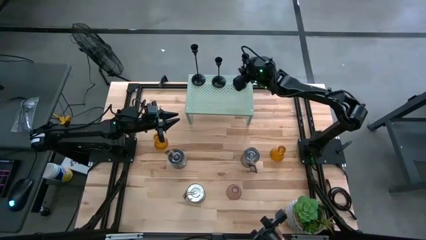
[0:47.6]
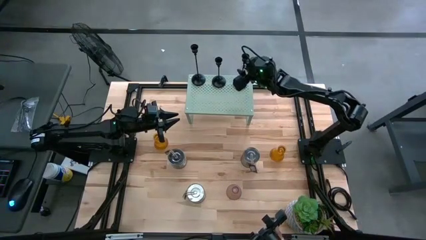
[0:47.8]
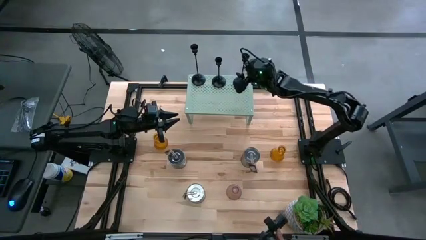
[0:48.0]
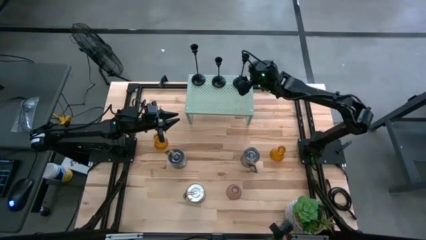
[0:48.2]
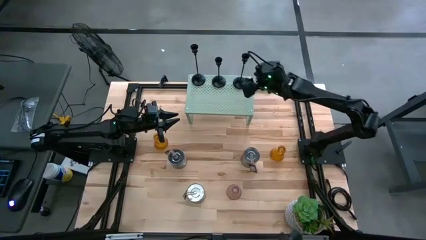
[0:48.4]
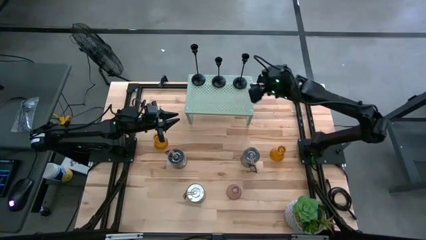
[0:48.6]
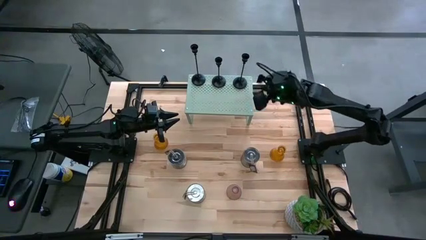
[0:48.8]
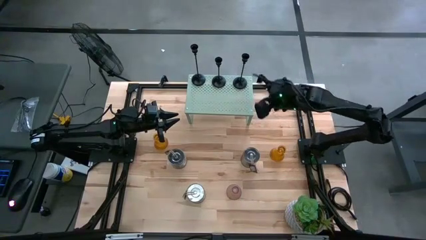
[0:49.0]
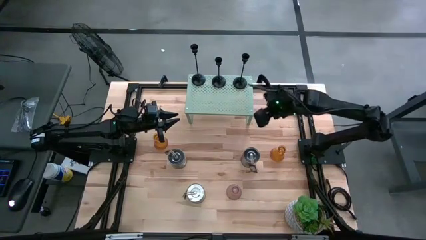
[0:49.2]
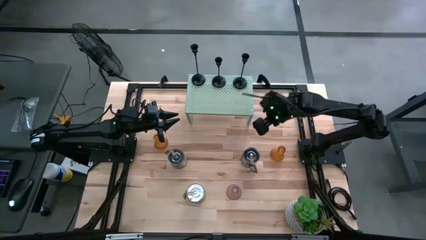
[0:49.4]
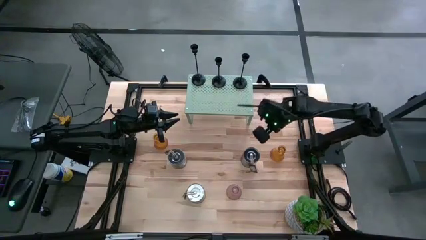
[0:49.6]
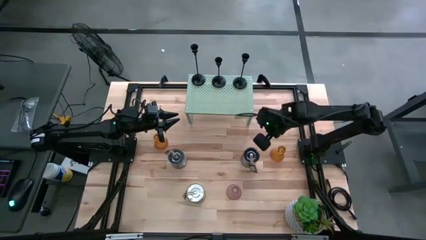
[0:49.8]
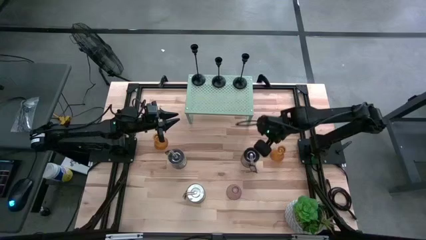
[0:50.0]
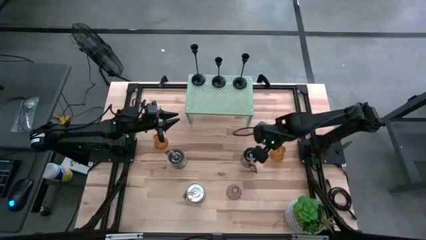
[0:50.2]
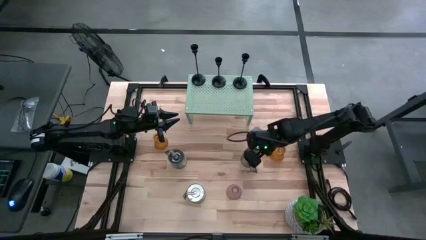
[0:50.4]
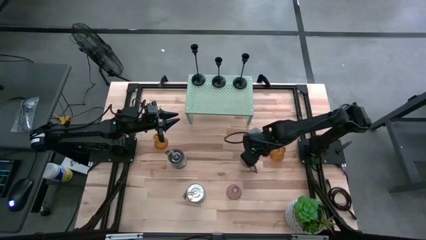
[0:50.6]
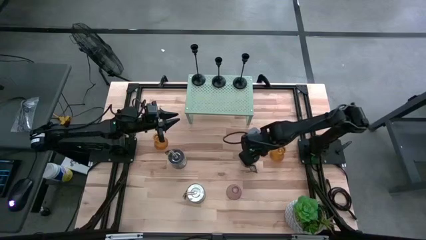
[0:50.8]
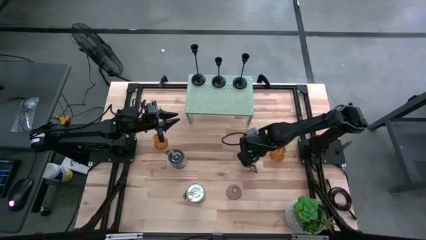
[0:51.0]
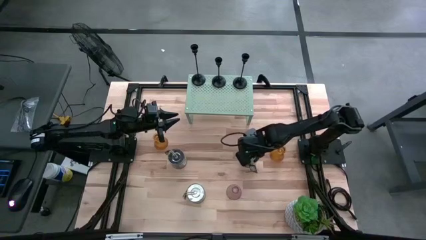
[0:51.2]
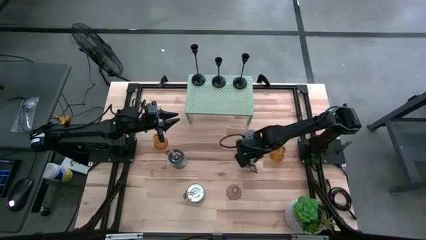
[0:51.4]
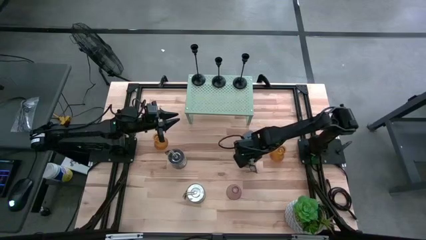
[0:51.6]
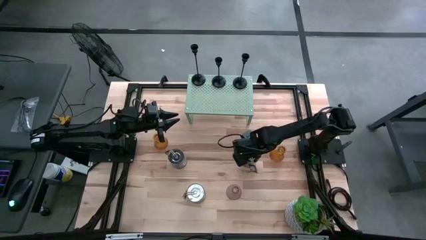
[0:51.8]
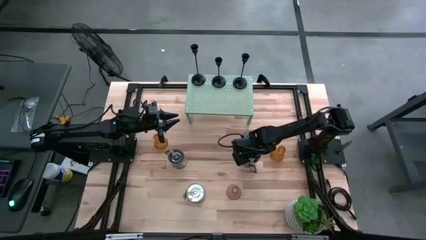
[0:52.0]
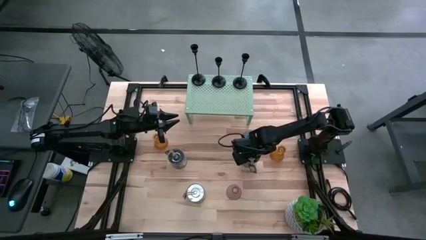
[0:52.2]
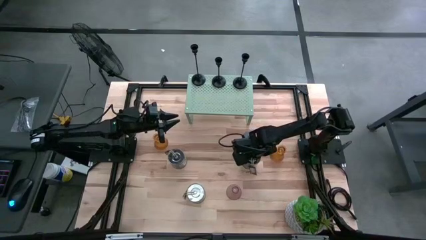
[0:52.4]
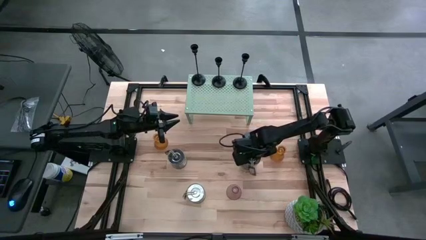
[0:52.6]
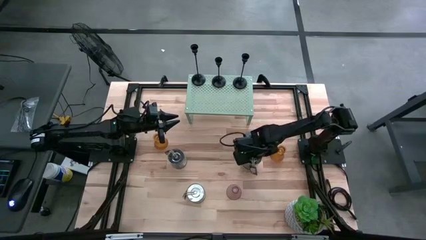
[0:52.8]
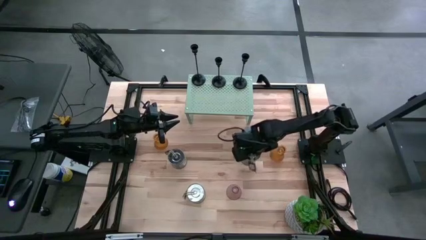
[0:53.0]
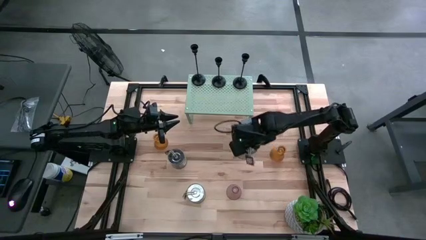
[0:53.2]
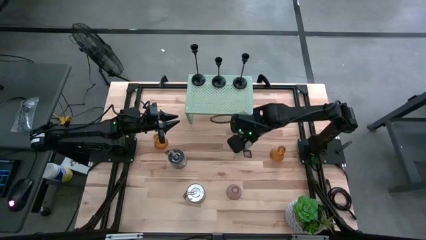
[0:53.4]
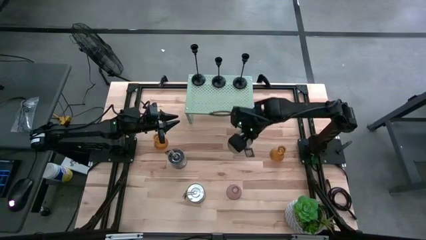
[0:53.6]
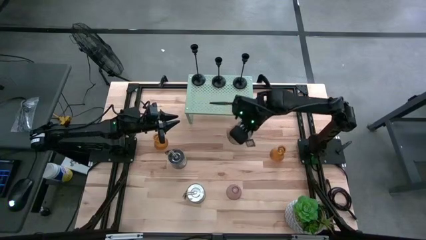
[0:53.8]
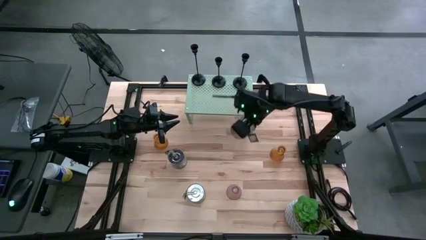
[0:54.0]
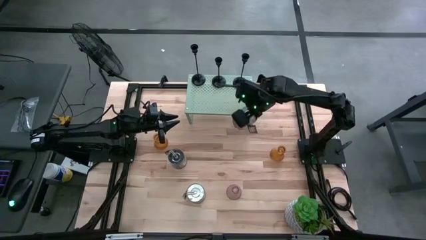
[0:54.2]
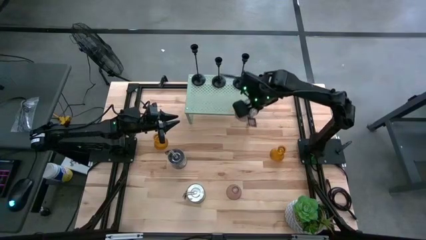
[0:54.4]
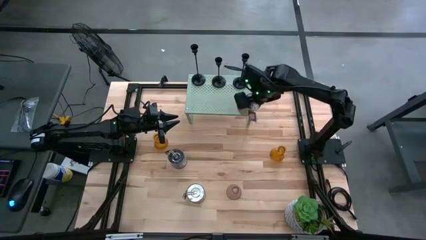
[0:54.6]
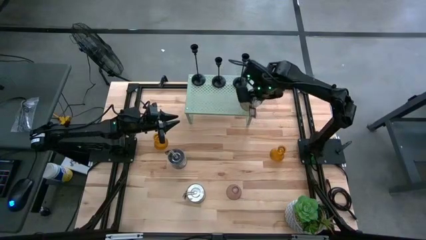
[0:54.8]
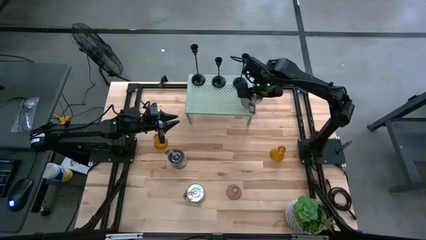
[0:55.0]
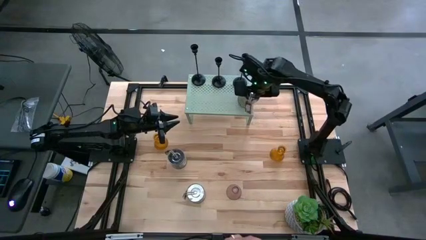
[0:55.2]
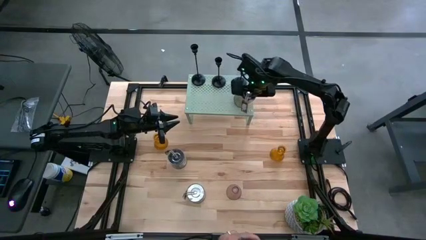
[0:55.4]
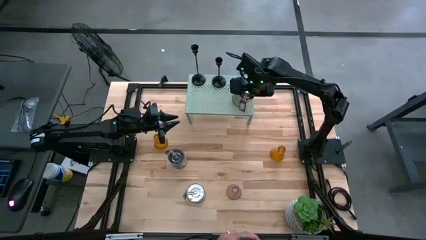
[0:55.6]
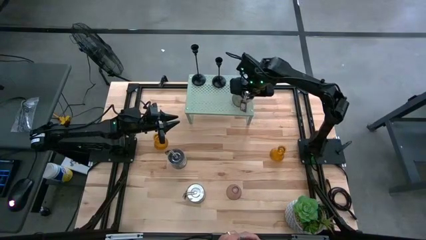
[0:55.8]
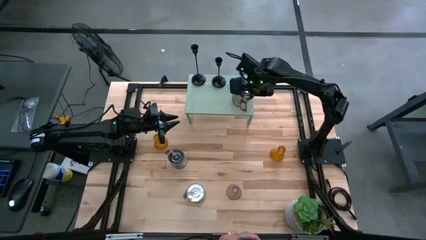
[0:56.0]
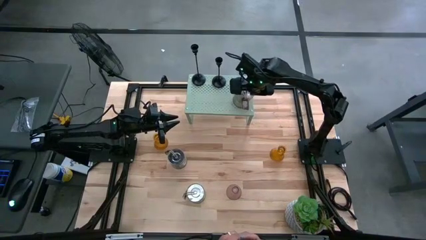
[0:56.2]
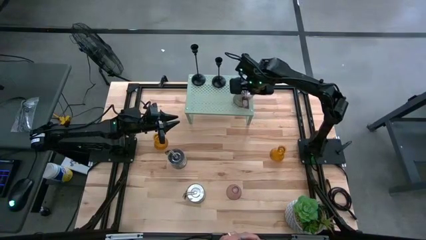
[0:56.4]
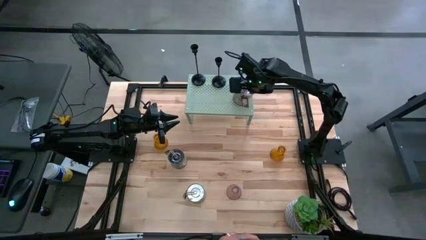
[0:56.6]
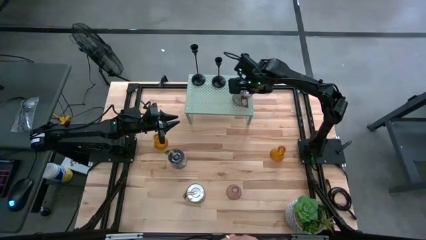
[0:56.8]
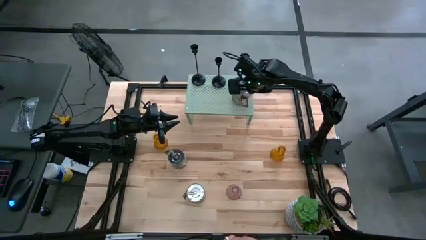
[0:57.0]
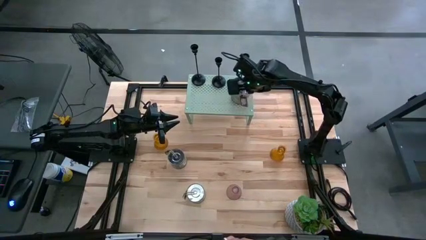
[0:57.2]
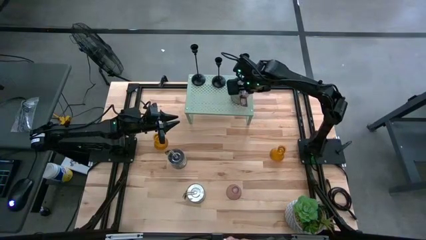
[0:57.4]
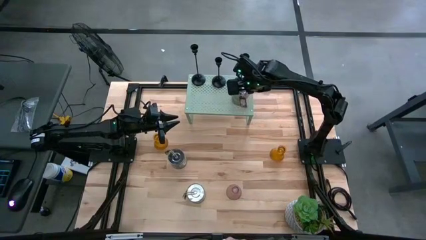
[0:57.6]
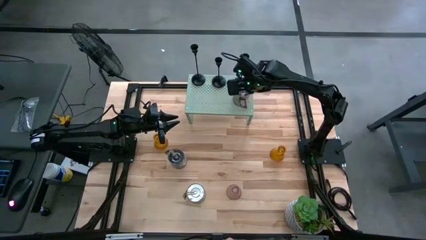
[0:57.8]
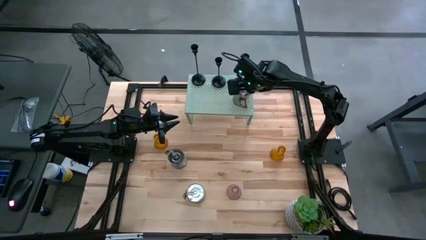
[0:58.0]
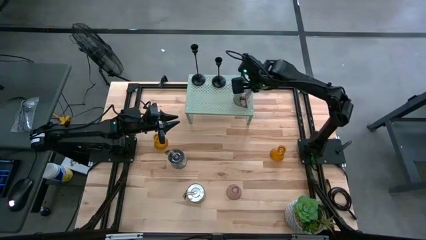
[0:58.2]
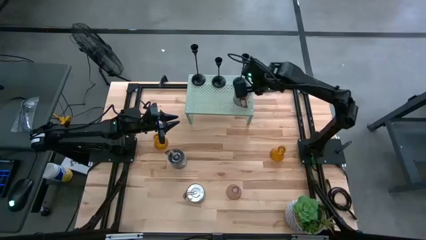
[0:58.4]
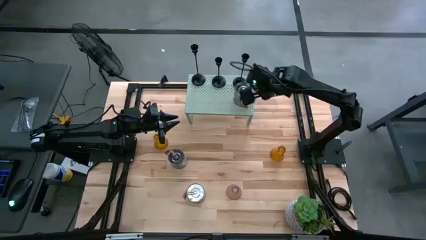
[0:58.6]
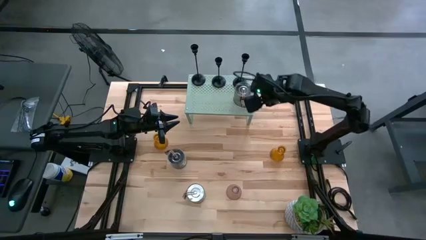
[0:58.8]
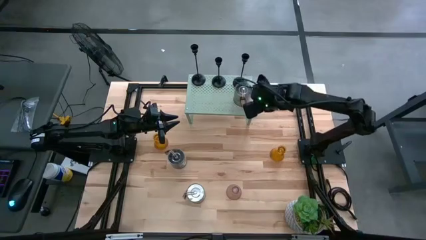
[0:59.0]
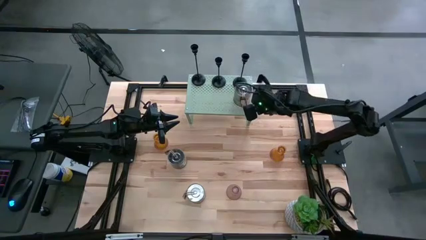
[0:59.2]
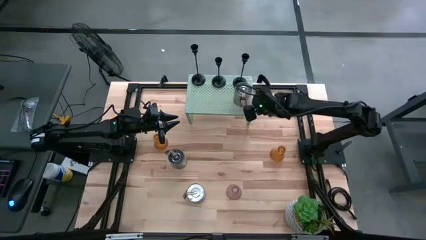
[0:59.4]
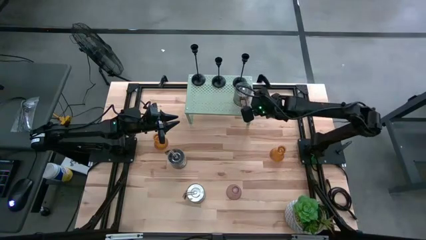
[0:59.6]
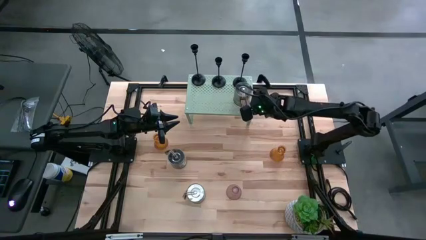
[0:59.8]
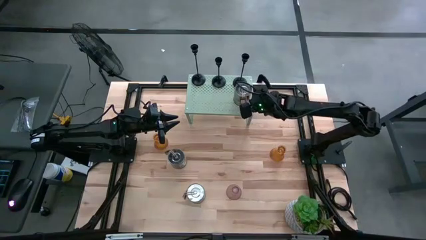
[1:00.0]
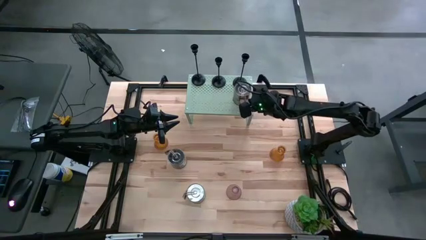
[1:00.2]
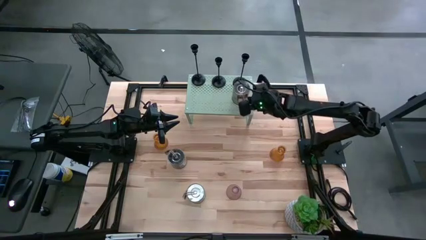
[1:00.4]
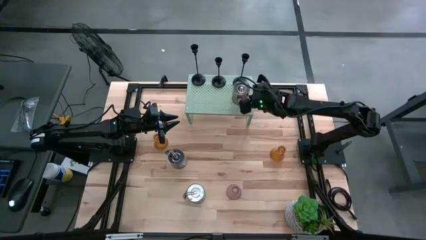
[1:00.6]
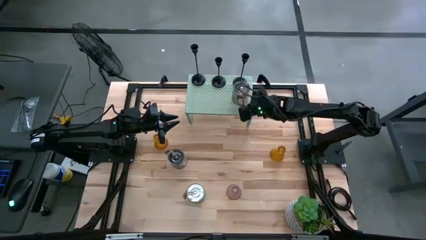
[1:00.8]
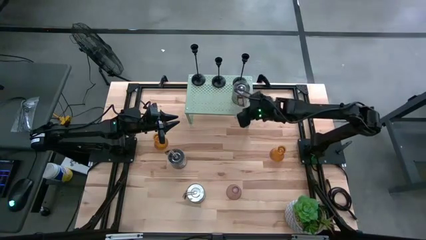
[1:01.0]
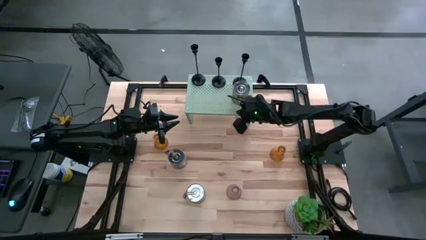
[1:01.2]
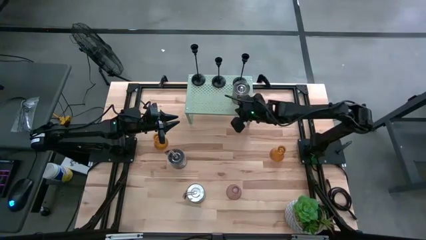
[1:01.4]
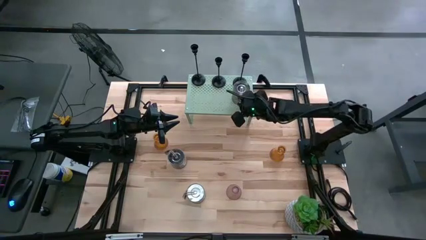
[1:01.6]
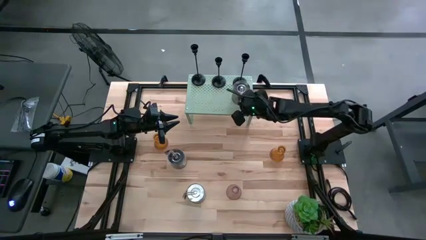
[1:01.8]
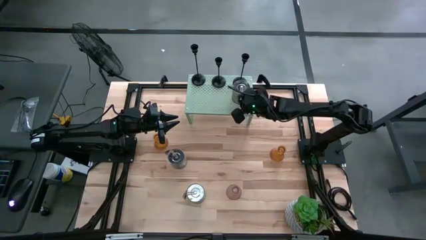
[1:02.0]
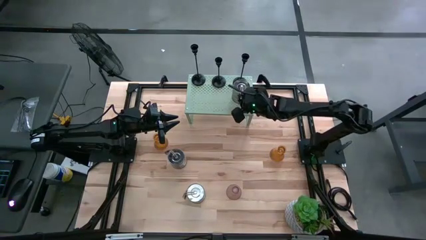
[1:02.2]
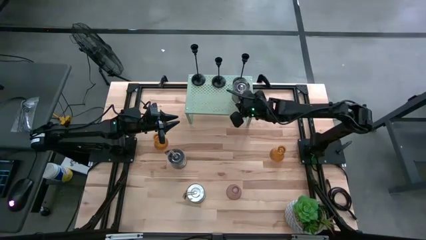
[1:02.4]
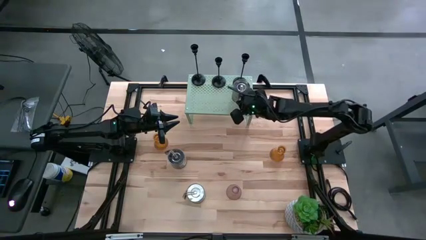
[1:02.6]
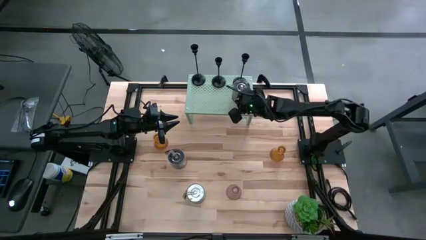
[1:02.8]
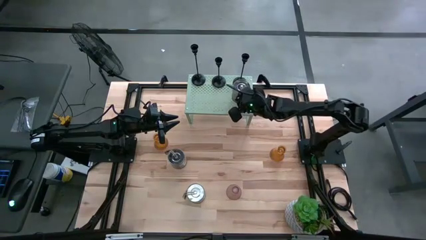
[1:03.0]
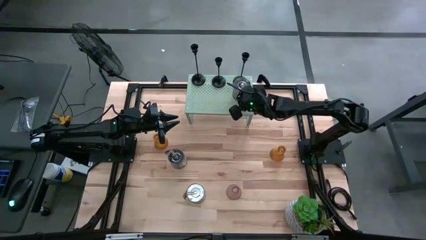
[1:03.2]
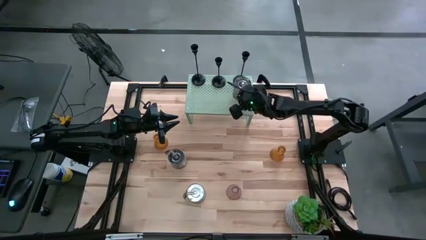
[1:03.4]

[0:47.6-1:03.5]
Task: Pick & Place candle stick holders
Put the right scented candle on the shelf
